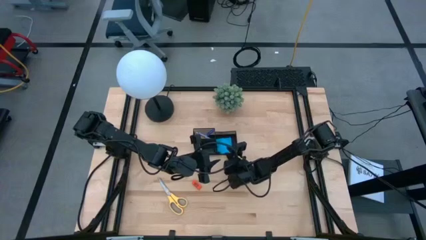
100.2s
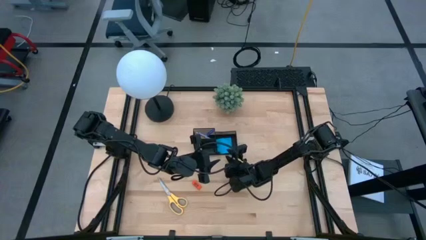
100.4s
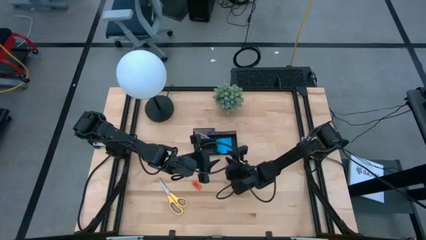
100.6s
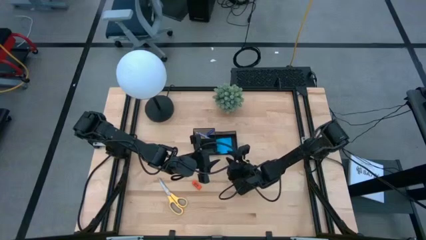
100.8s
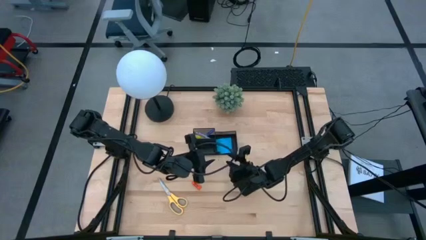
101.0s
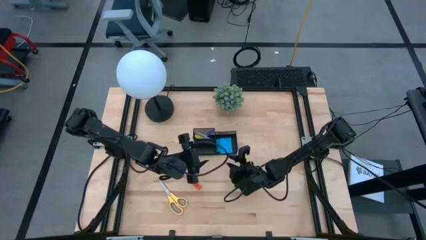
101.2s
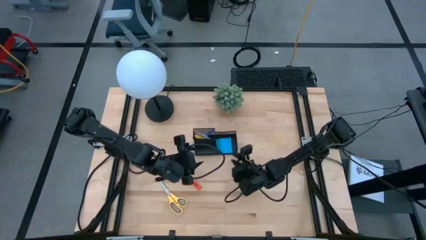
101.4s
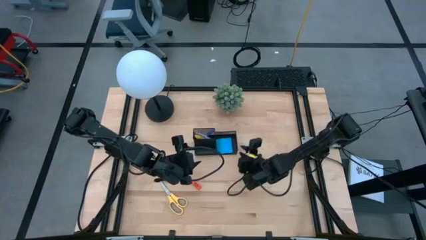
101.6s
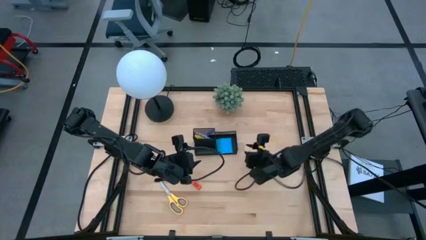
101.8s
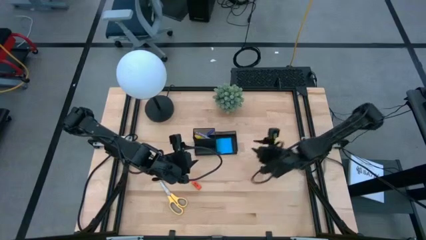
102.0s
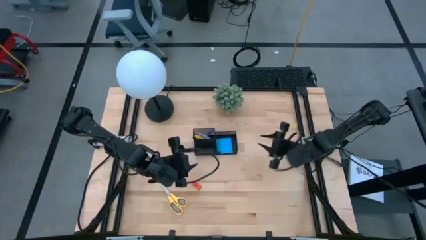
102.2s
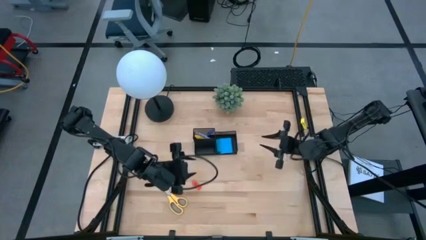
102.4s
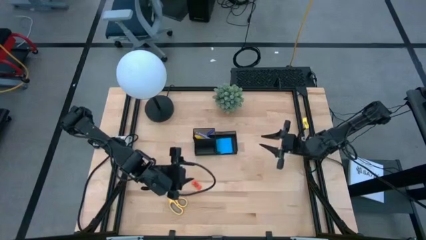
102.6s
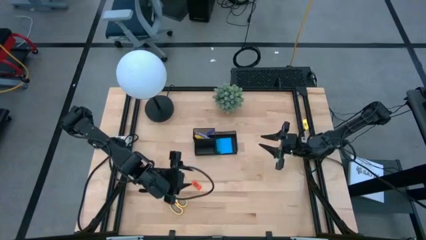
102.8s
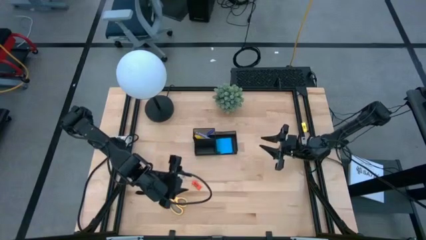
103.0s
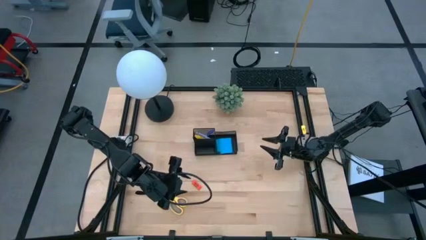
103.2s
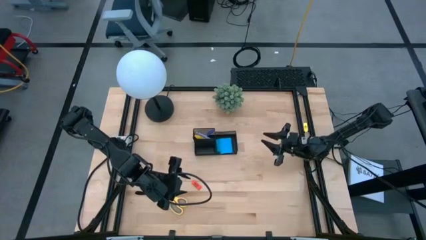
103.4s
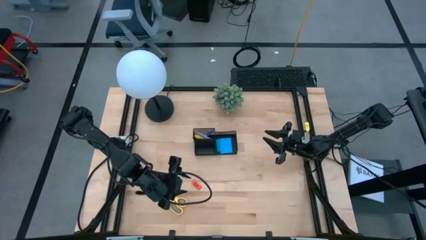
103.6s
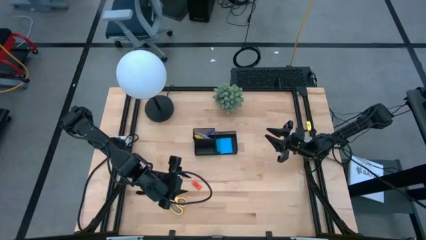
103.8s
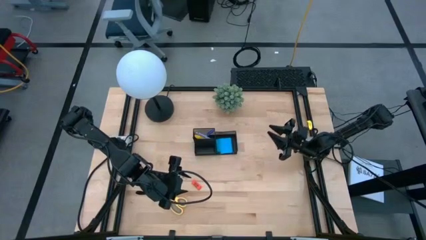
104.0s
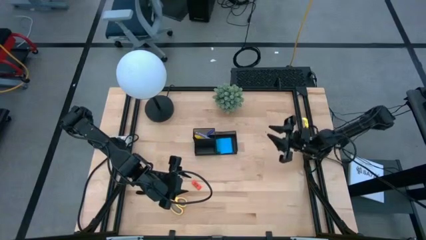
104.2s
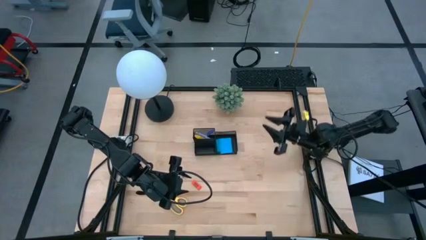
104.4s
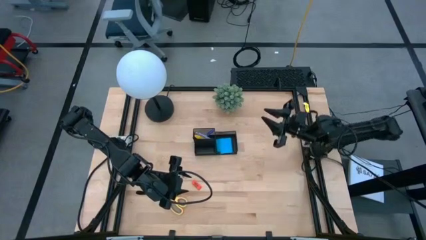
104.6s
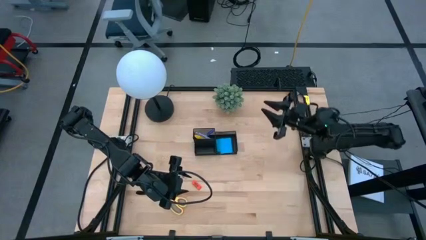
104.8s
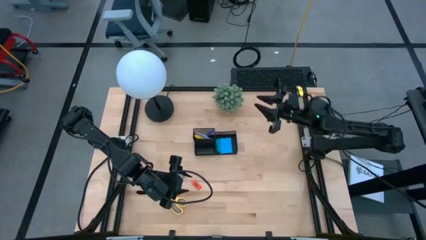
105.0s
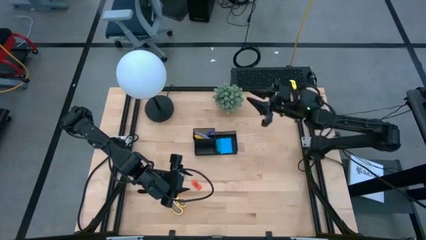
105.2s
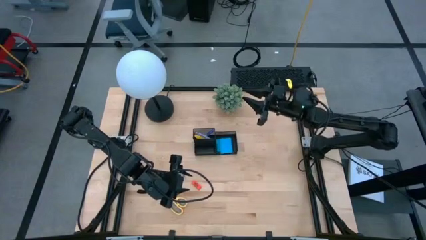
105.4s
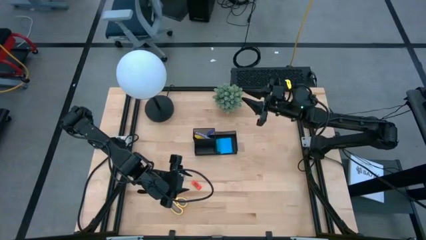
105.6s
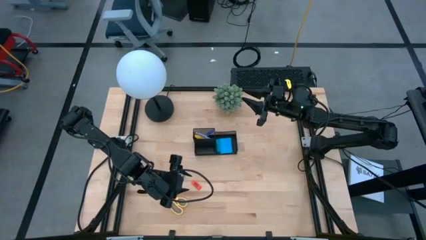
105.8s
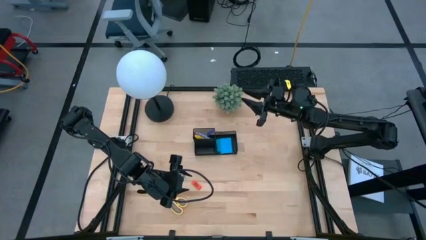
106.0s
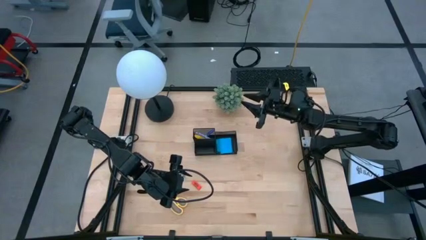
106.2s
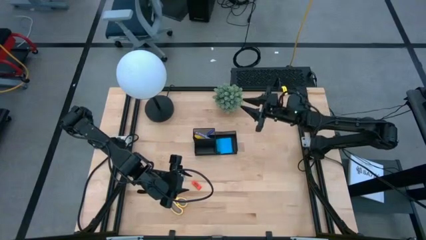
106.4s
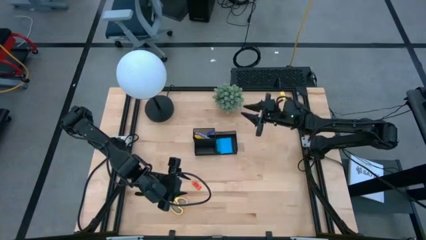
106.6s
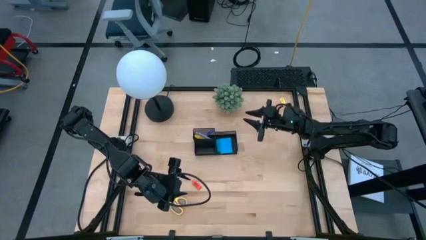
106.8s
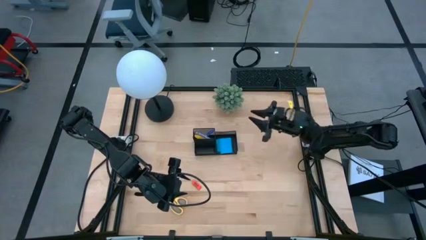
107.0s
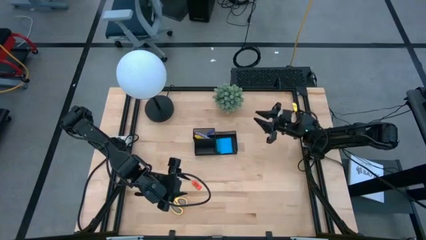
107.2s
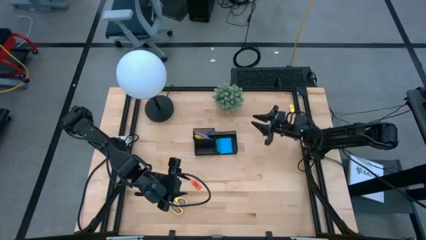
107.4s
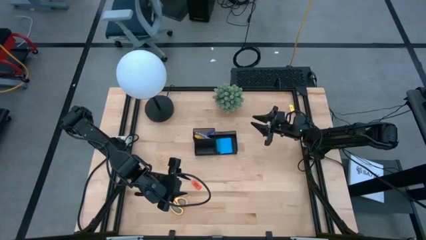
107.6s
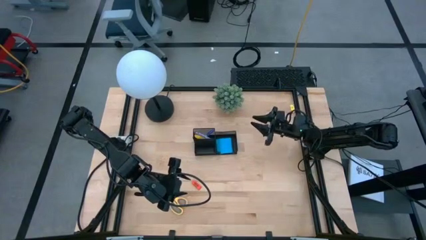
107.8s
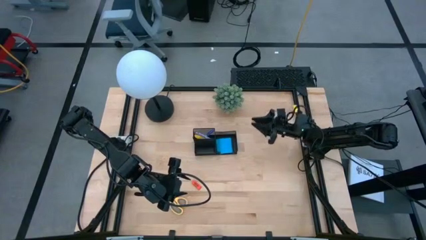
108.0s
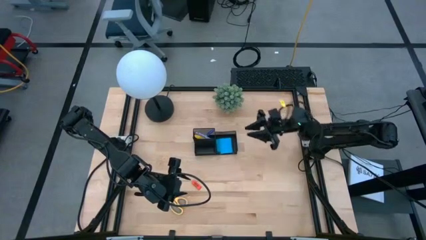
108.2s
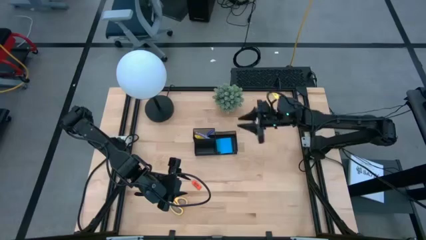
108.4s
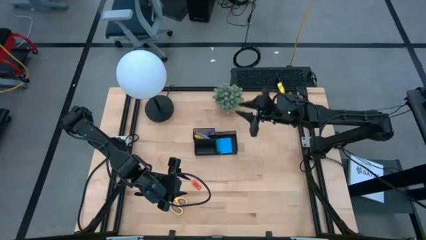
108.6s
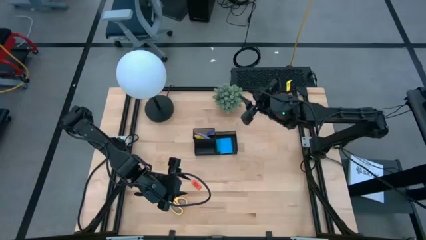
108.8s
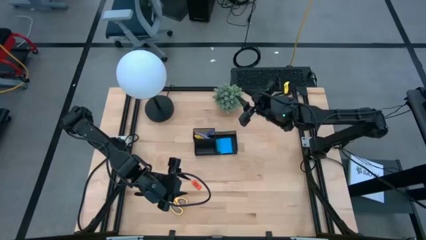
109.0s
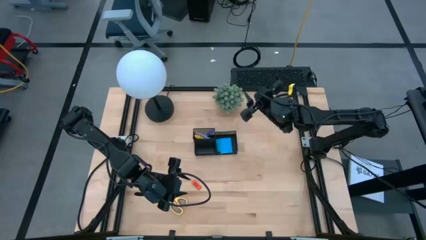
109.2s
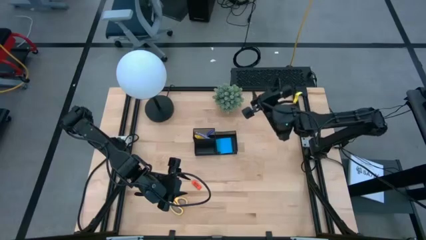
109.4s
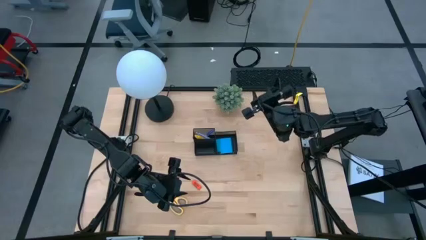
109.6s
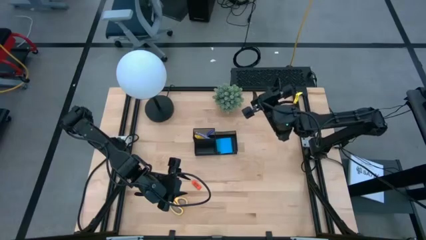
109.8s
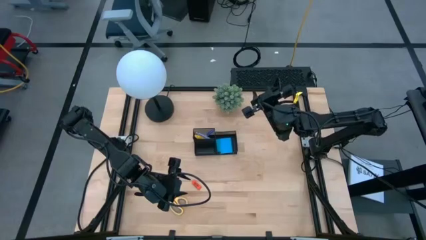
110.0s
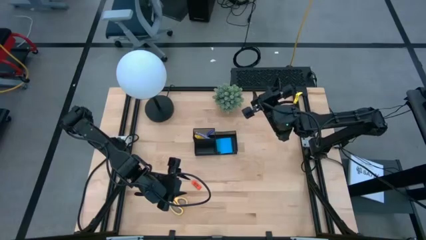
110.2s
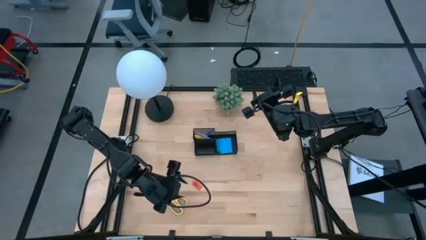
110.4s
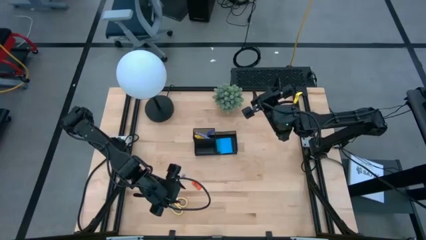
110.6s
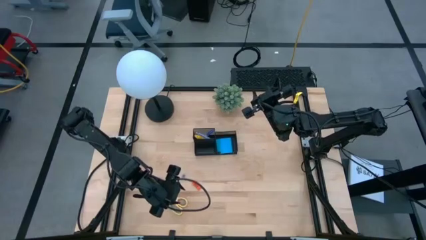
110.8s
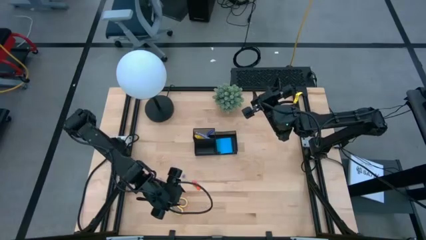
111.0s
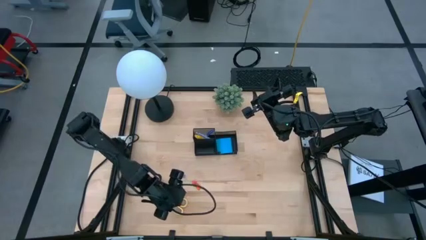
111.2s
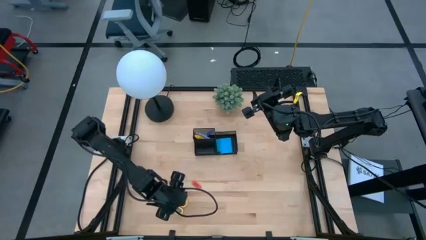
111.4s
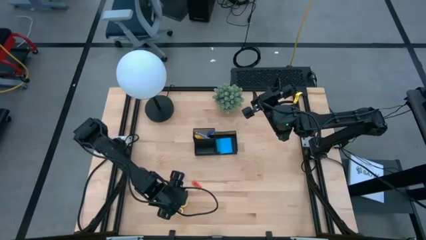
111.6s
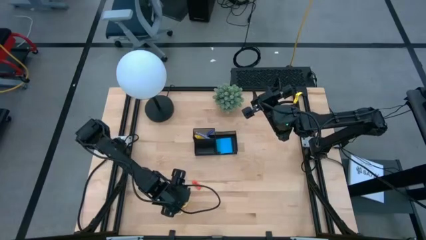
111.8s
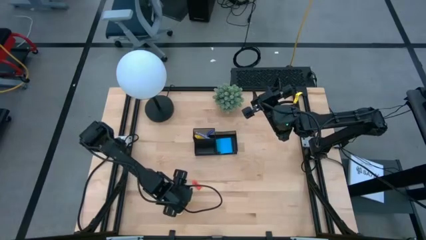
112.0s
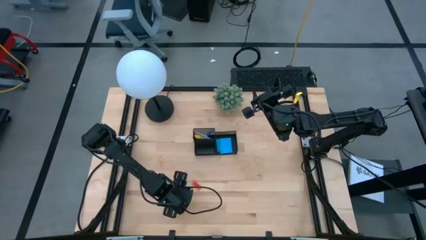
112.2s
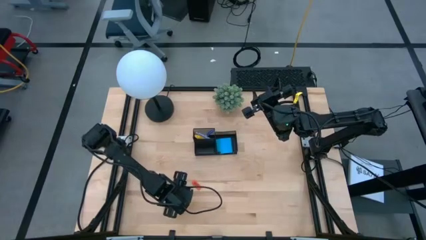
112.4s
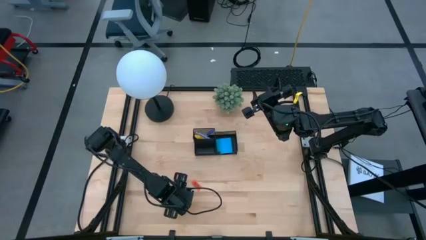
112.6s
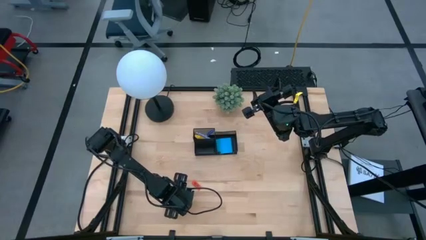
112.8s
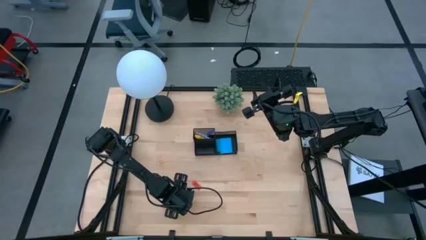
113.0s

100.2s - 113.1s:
Task: Pick and place office supplies into organizer
Put the scissor into the desk organizer
